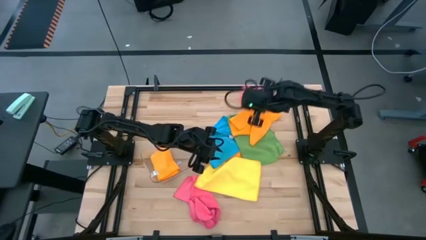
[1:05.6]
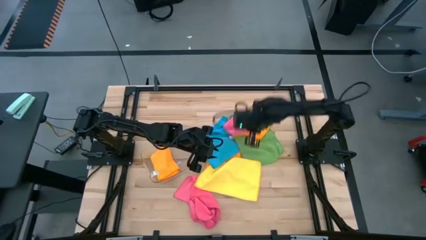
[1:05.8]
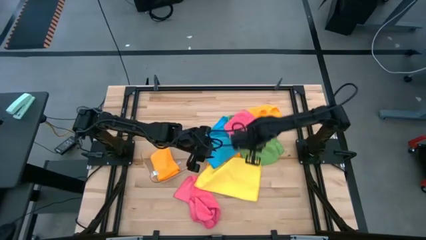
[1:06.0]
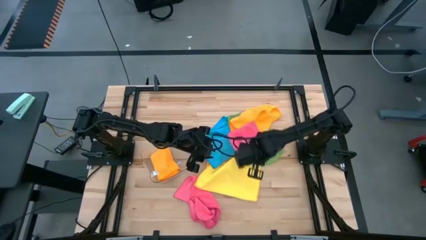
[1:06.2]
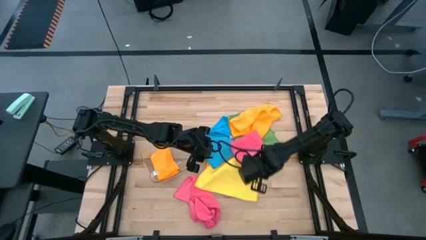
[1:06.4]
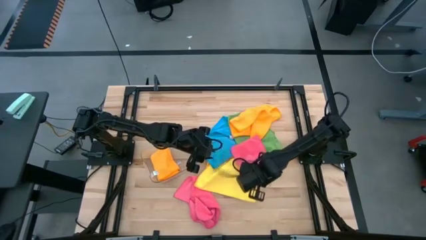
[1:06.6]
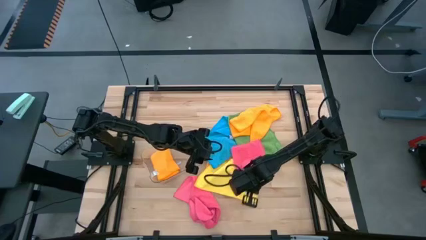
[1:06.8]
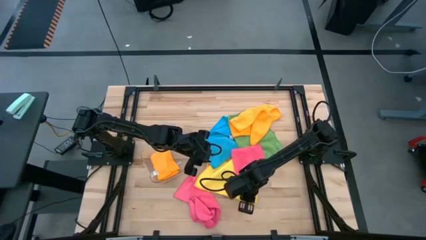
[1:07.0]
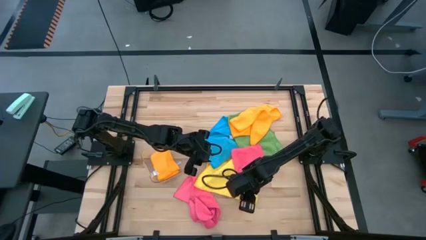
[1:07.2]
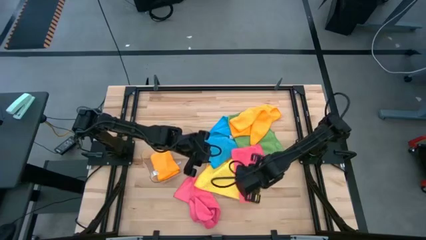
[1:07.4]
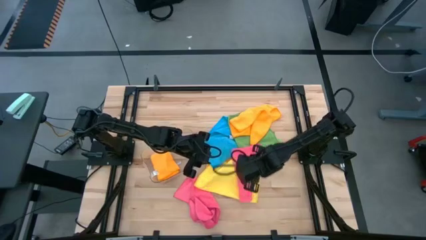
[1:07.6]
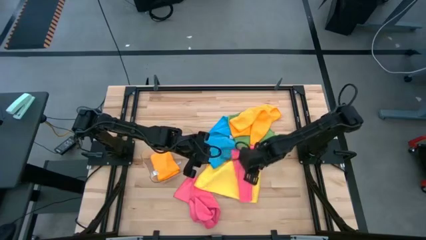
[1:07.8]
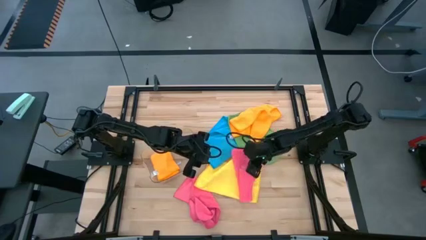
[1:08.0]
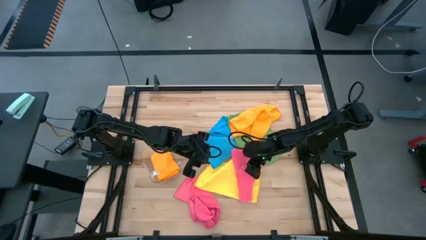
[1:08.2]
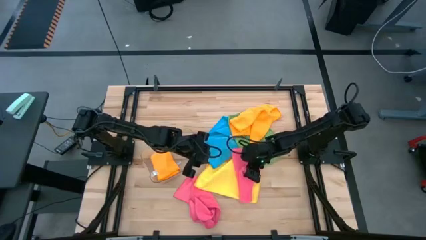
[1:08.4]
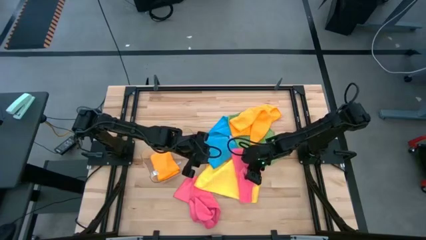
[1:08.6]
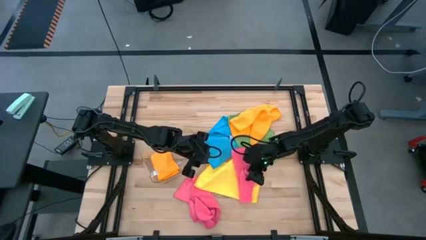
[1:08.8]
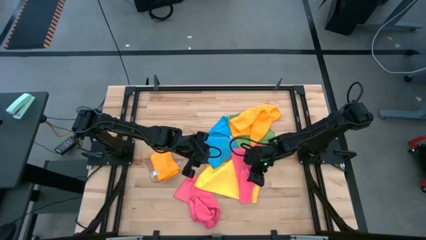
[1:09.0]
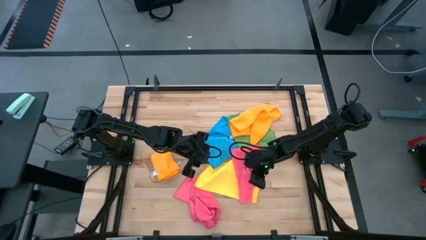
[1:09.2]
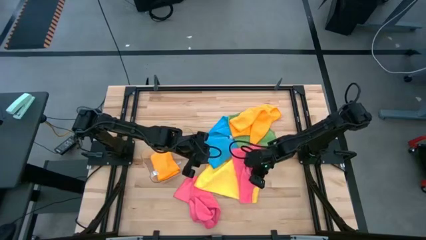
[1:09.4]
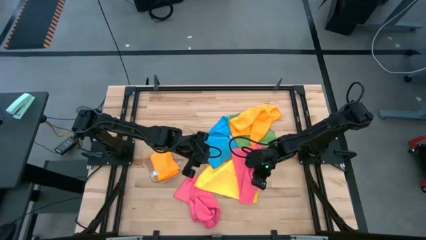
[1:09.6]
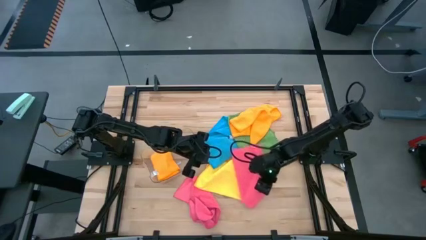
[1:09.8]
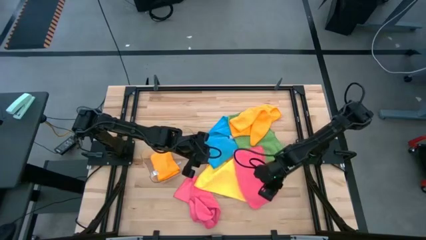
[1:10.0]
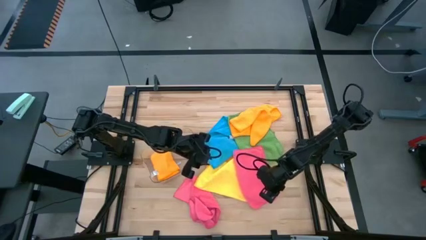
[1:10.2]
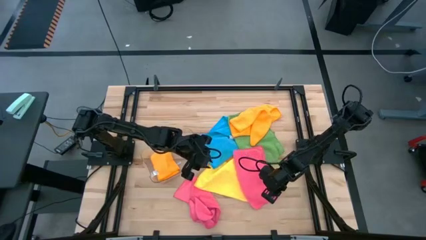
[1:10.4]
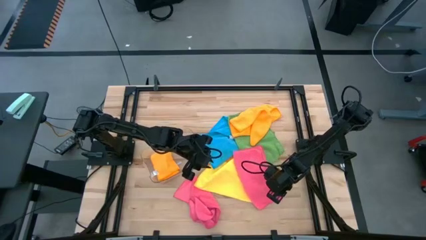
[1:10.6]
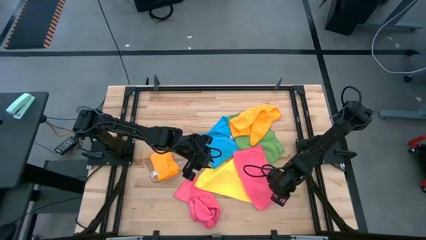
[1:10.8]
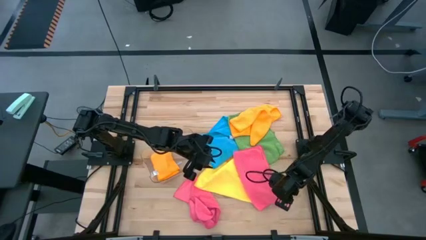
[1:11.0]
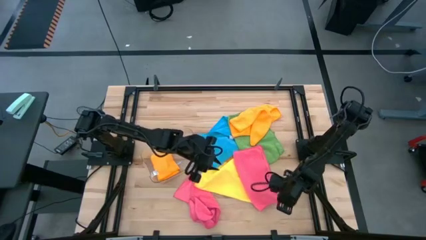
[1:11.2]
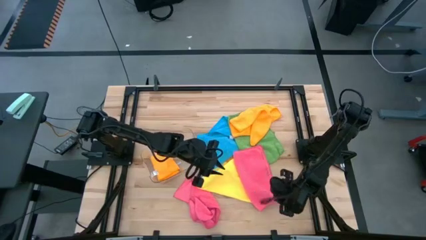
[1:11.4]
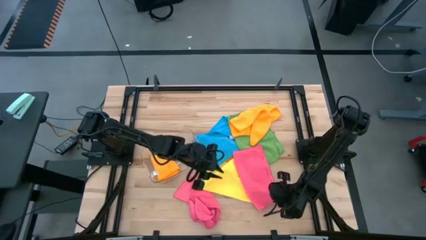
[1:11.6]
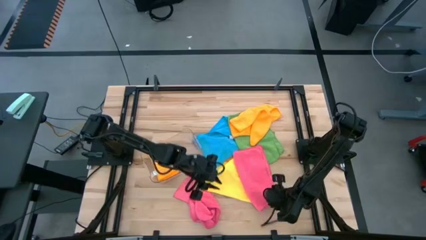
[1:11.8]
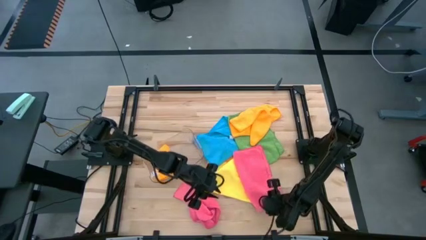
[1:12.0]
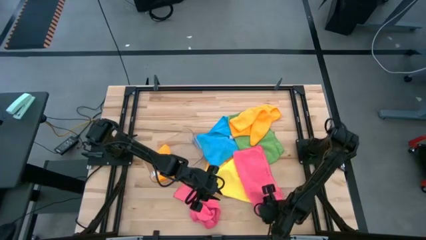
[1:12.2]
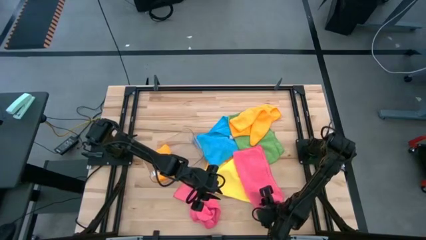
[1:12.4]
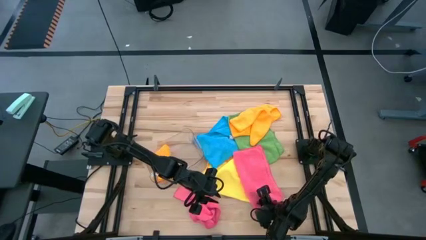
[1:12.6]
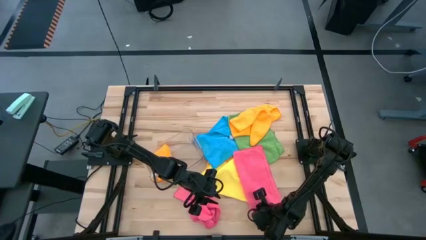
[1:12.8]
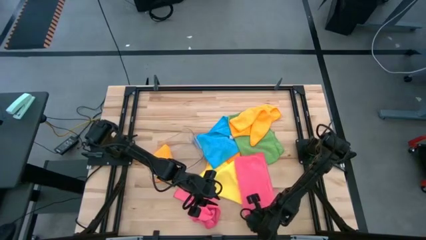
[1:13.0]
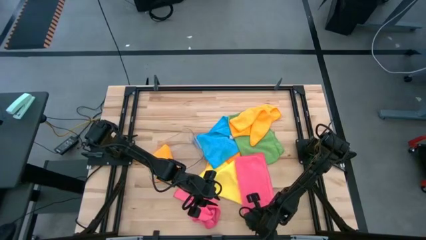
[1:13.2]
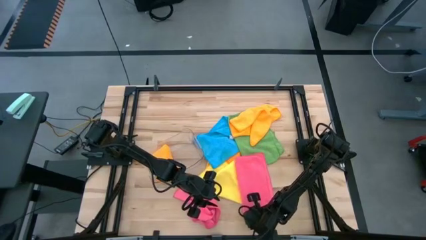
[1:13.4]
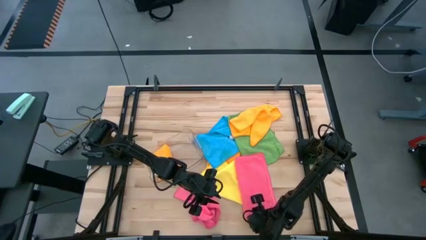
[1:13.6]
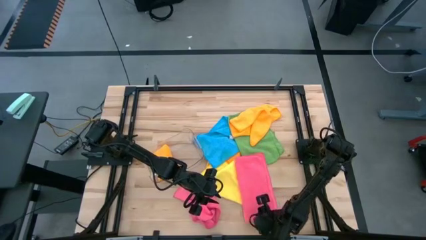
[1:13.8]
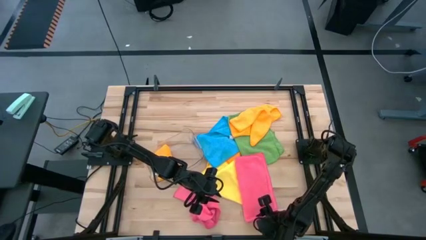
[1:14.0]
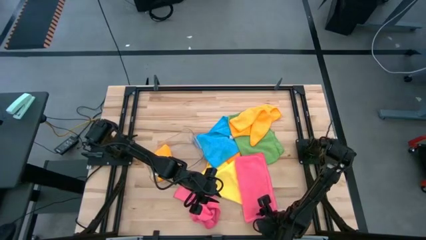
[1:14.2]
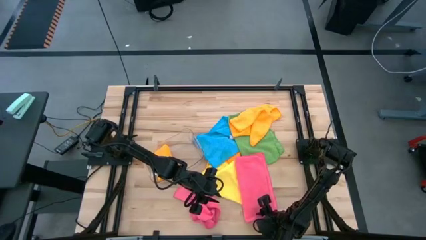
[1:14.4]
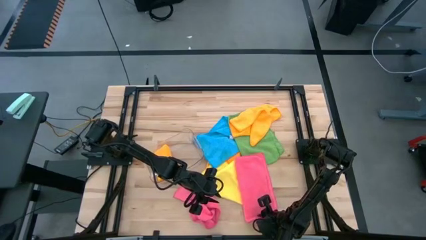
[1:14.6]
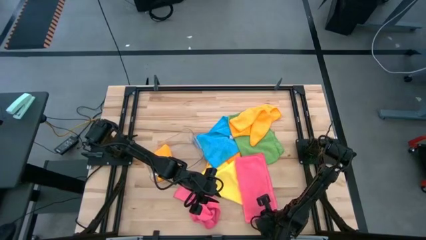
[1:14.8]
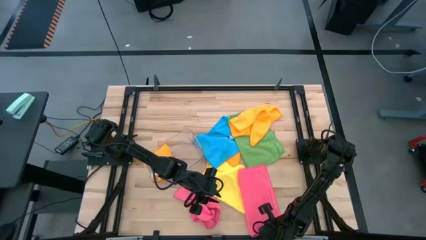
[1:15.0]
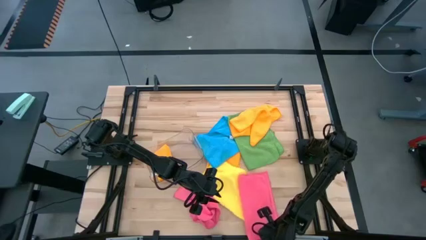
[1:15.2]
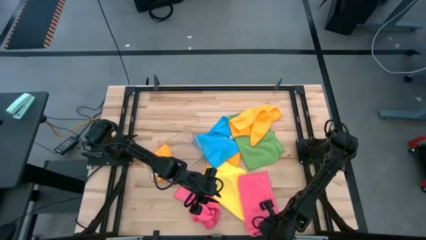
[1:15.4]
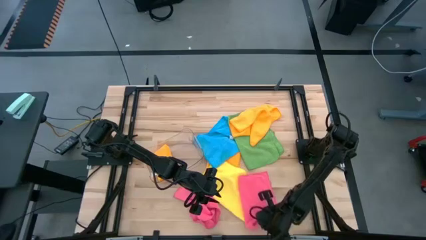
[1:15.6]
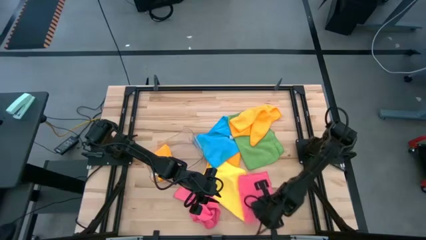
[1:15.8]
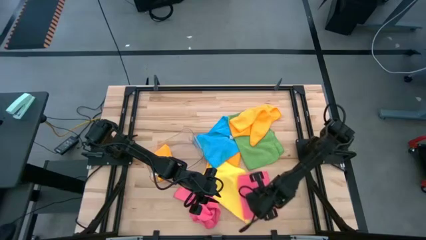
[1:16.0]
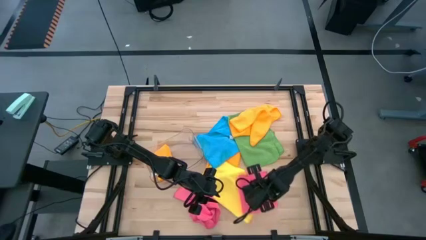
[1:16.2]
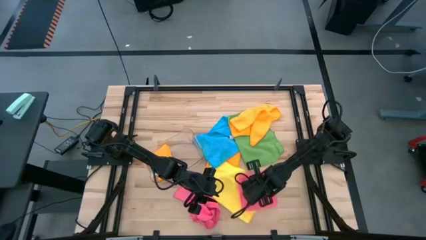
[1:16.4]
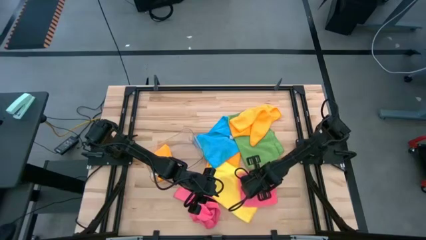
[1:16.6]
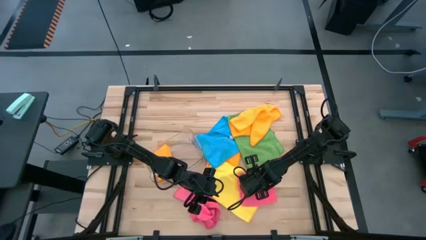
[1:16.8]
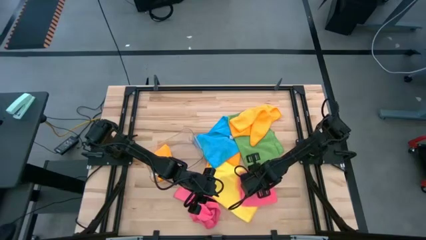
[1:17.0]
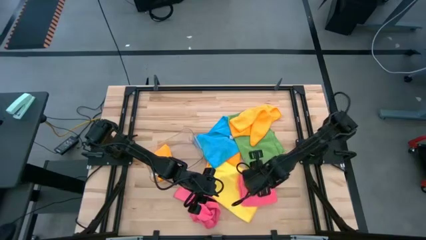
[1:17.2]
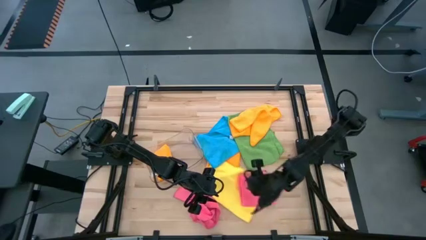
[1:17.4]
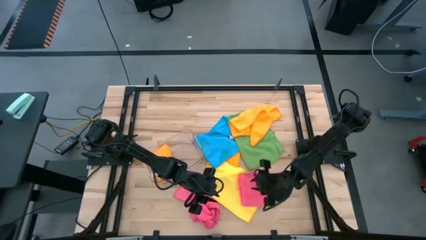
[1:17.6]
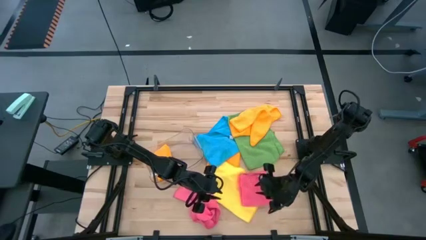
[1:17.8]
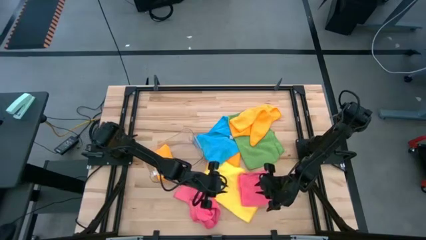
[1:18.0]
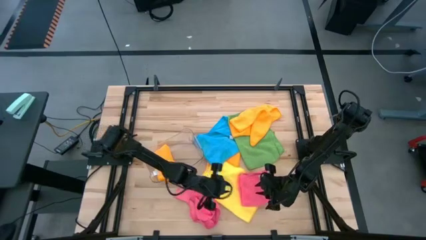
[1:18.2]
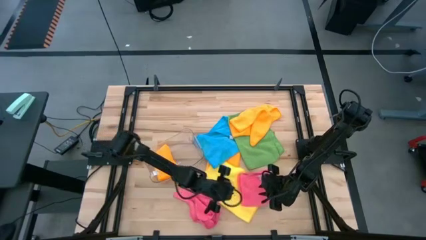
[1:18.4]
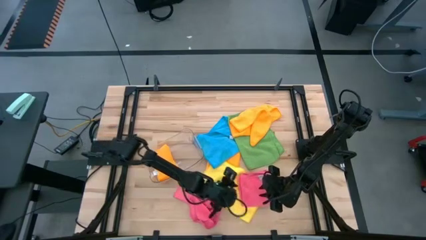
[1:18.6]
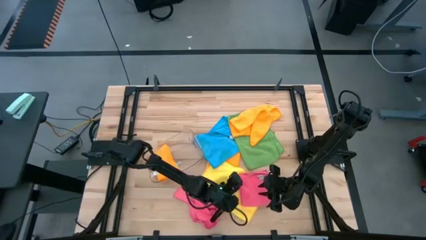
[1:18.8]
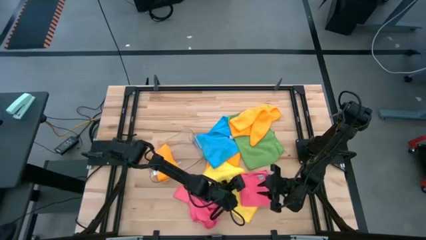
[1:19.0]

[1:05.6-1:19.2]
Task: Fold microfiber towels
Fold the top pink microfiber cloth
